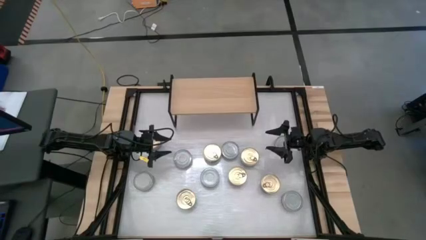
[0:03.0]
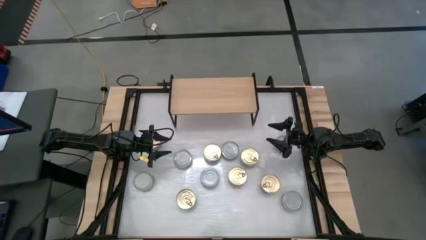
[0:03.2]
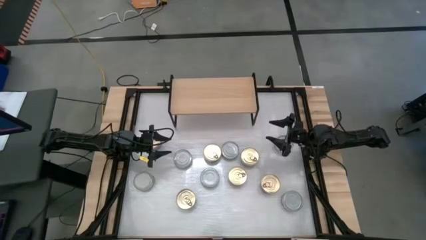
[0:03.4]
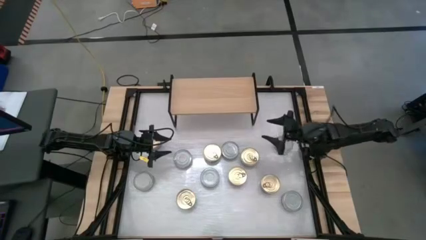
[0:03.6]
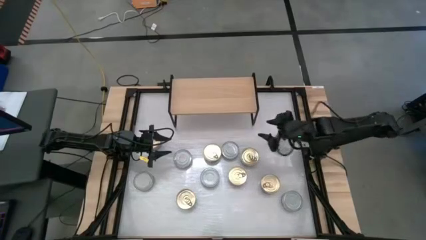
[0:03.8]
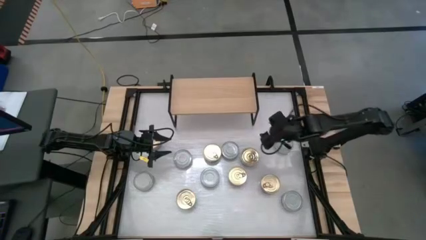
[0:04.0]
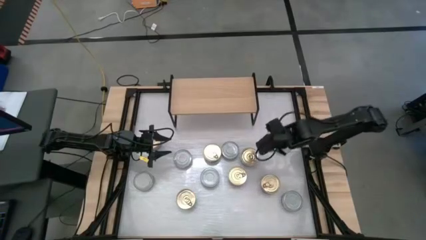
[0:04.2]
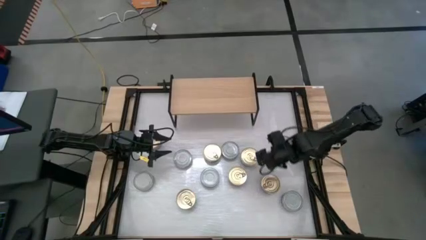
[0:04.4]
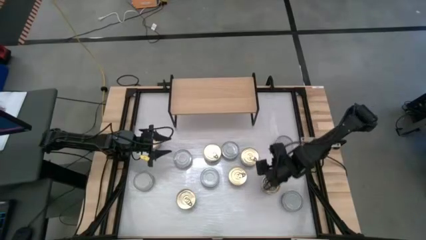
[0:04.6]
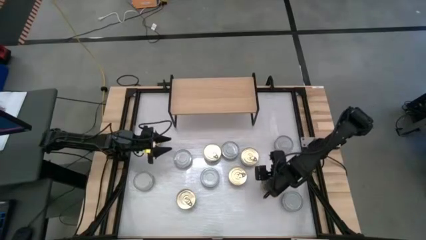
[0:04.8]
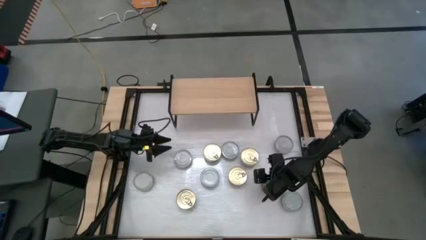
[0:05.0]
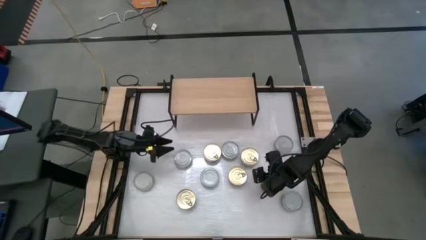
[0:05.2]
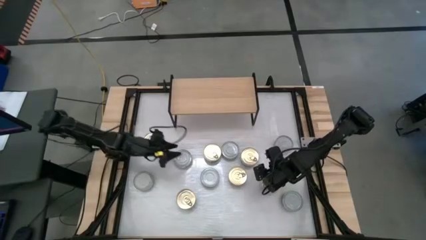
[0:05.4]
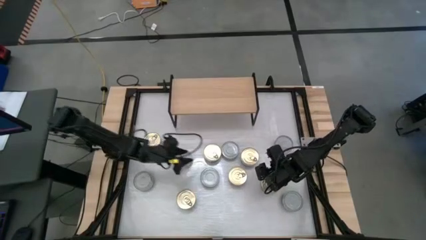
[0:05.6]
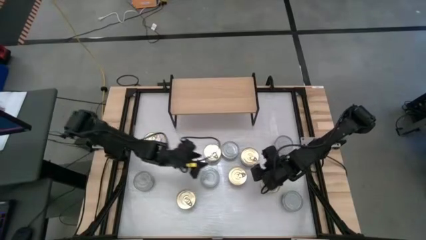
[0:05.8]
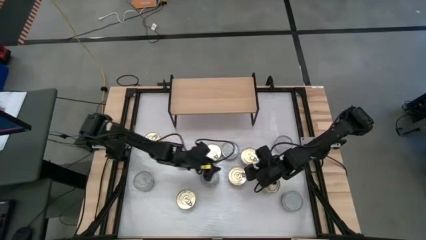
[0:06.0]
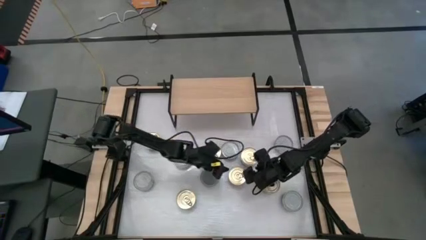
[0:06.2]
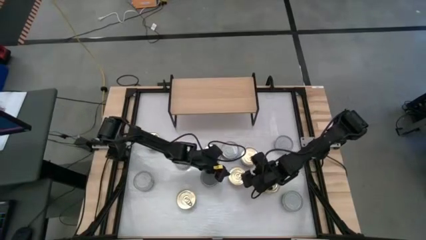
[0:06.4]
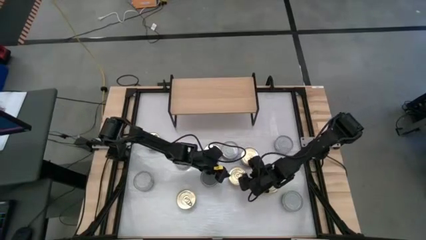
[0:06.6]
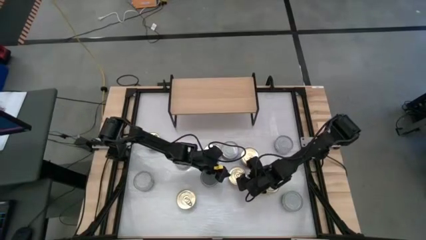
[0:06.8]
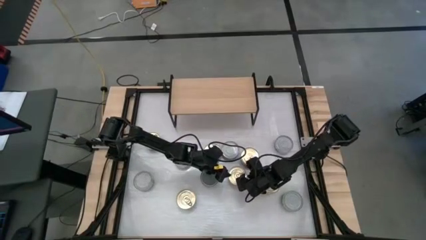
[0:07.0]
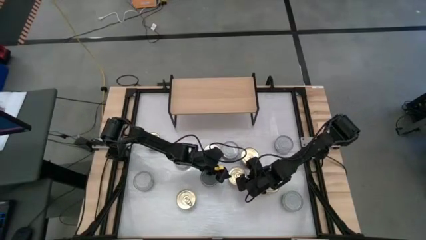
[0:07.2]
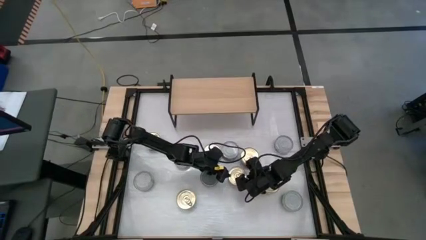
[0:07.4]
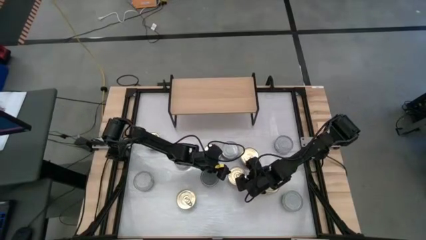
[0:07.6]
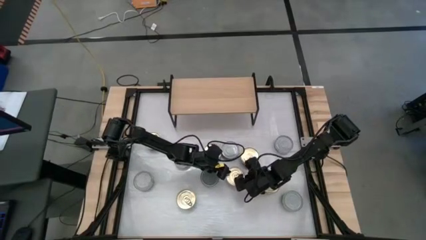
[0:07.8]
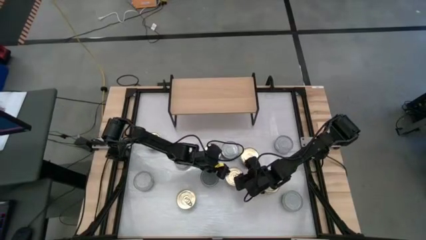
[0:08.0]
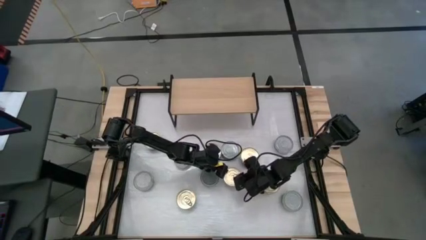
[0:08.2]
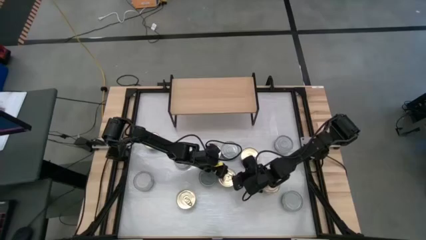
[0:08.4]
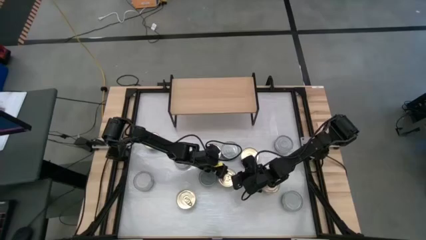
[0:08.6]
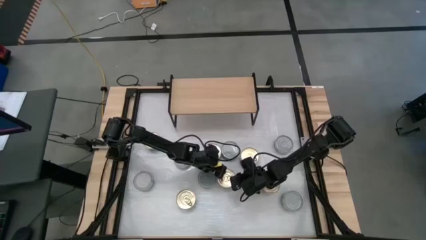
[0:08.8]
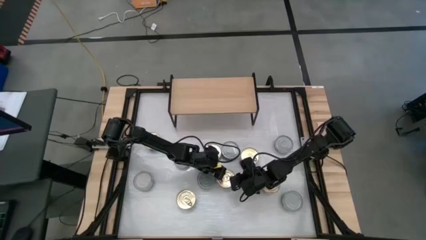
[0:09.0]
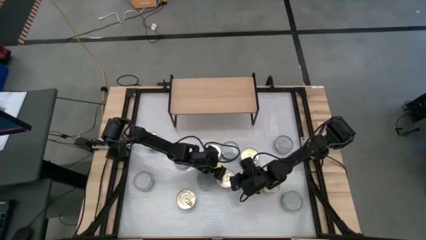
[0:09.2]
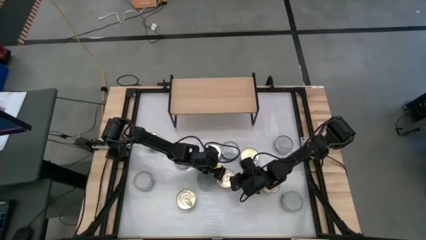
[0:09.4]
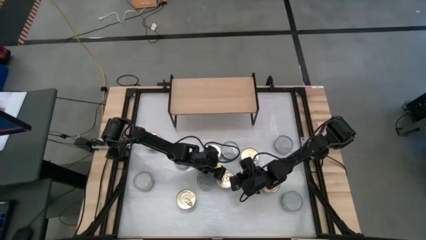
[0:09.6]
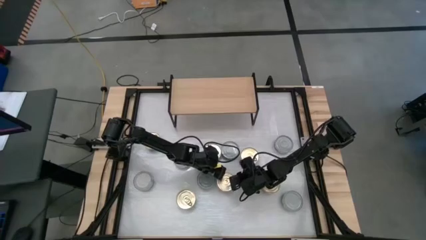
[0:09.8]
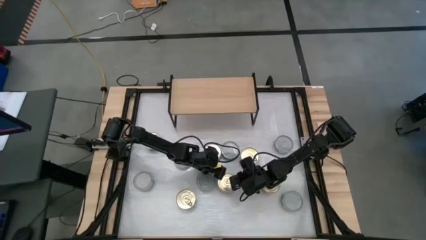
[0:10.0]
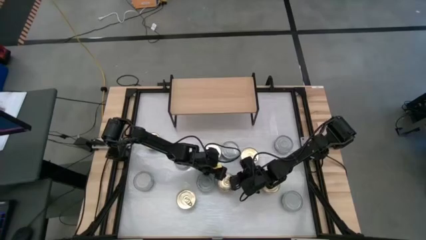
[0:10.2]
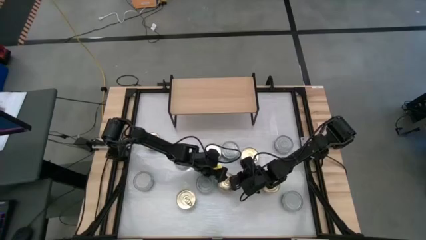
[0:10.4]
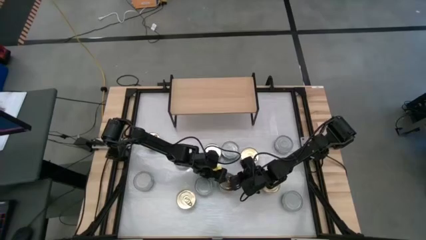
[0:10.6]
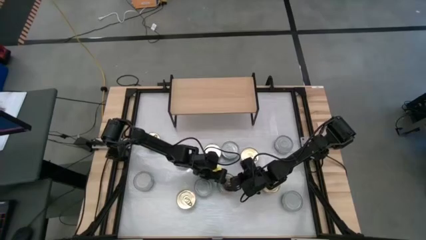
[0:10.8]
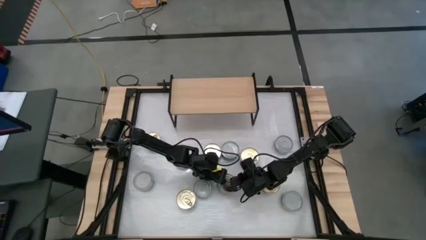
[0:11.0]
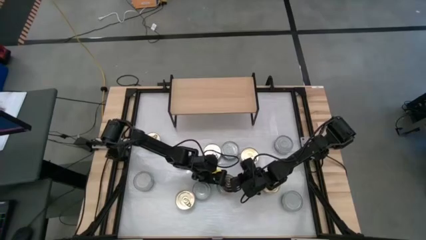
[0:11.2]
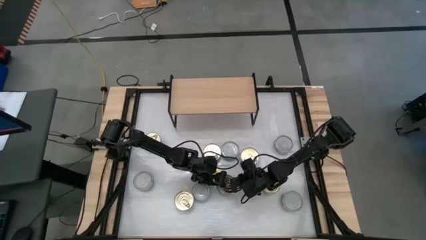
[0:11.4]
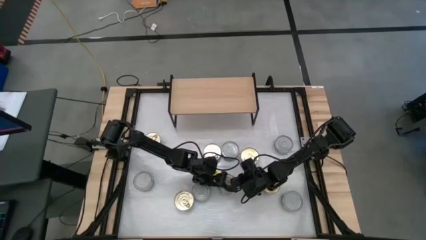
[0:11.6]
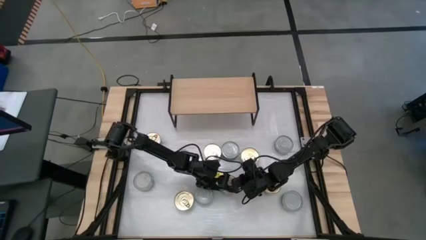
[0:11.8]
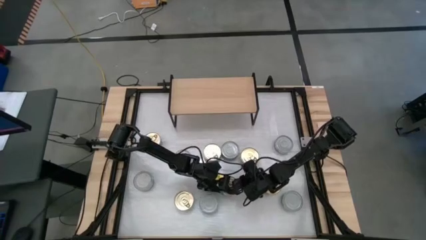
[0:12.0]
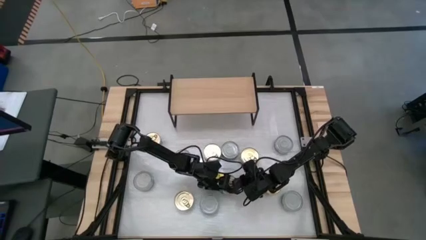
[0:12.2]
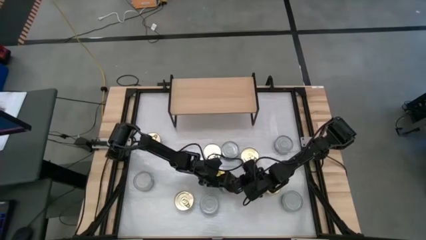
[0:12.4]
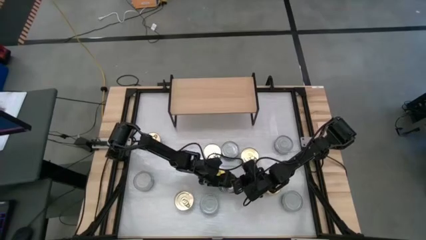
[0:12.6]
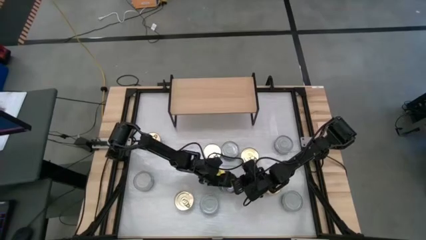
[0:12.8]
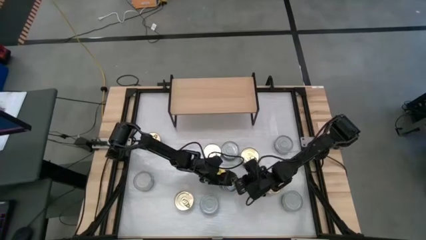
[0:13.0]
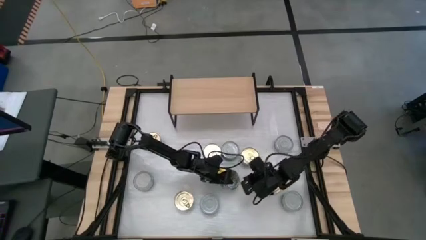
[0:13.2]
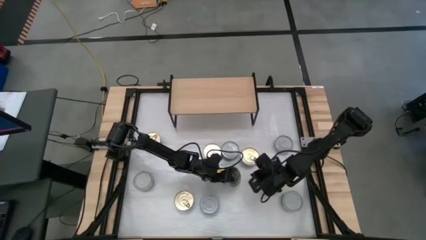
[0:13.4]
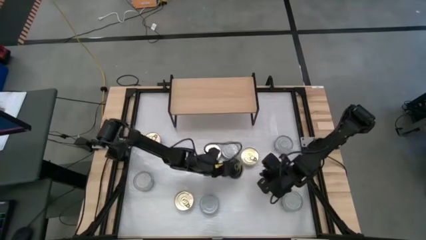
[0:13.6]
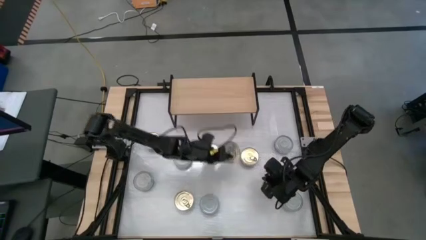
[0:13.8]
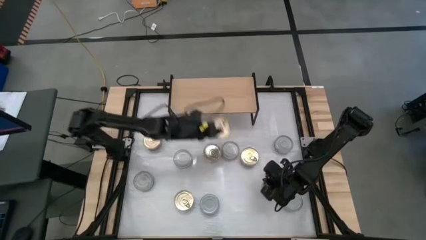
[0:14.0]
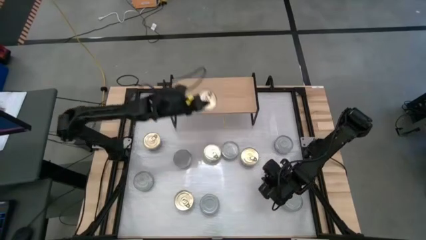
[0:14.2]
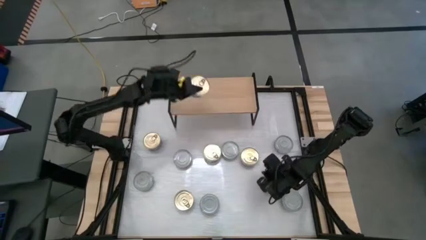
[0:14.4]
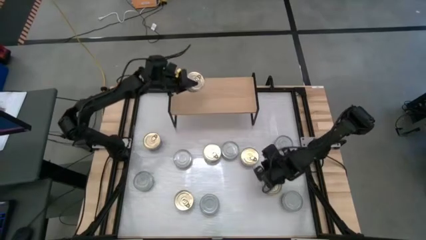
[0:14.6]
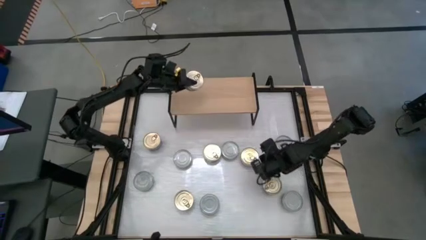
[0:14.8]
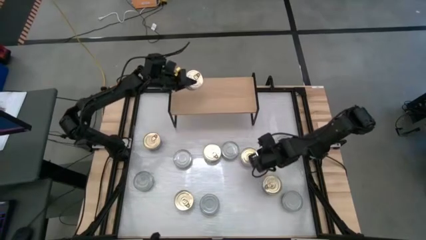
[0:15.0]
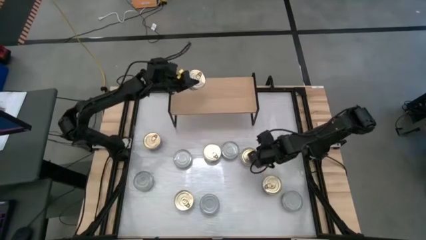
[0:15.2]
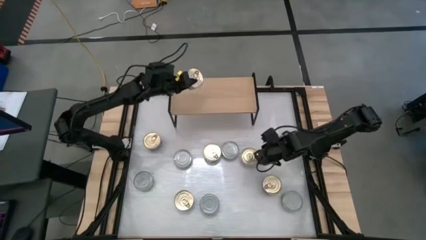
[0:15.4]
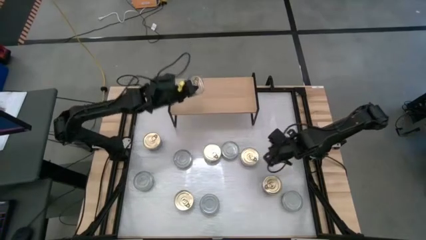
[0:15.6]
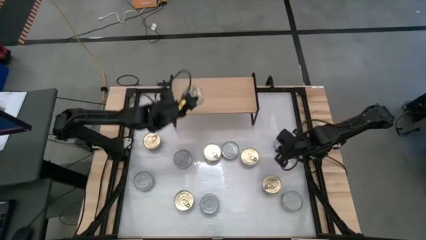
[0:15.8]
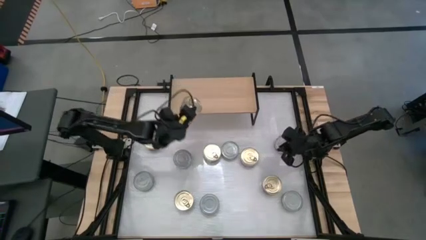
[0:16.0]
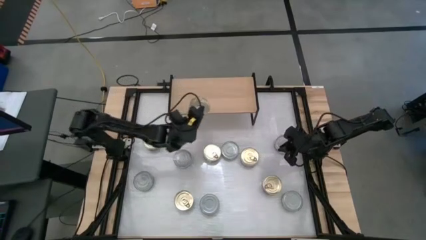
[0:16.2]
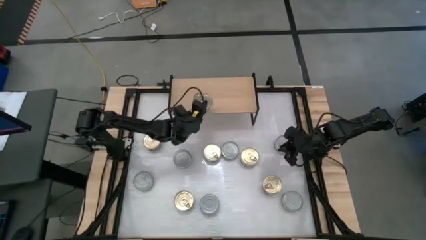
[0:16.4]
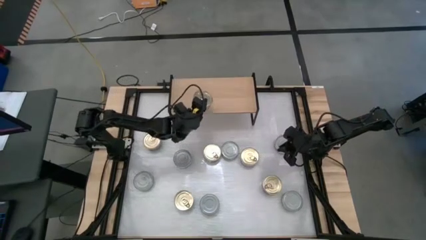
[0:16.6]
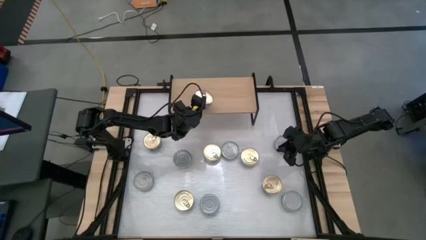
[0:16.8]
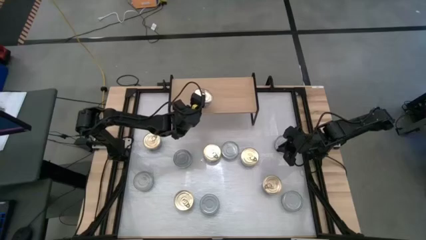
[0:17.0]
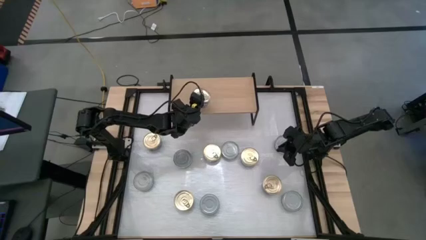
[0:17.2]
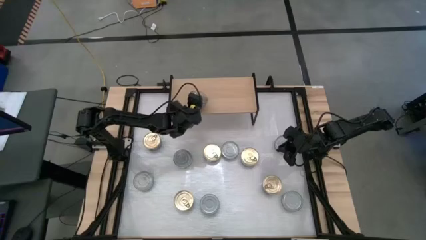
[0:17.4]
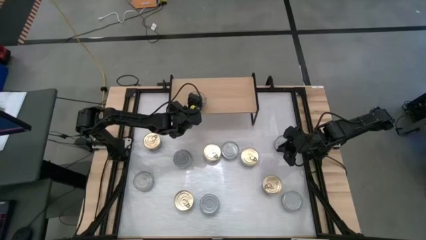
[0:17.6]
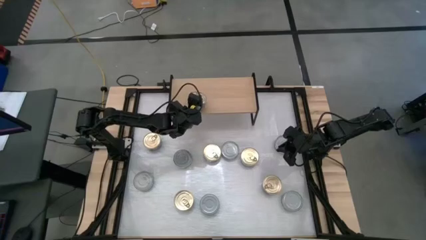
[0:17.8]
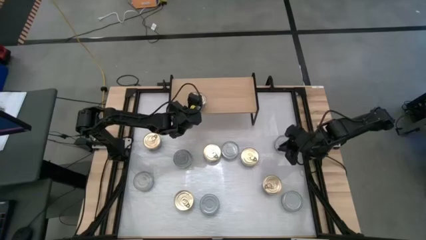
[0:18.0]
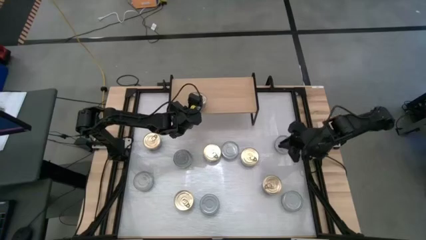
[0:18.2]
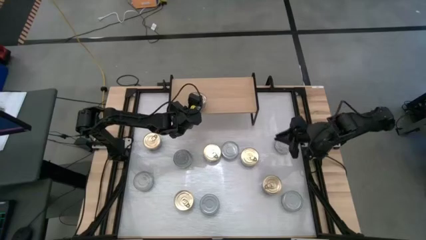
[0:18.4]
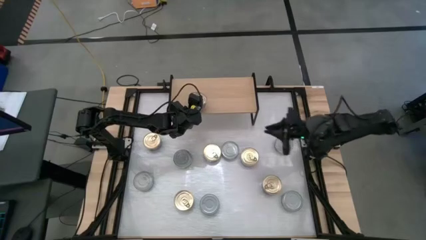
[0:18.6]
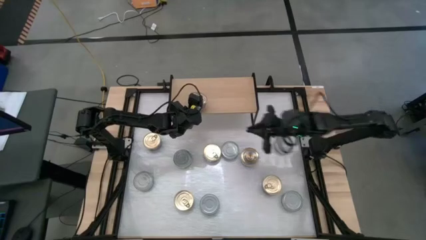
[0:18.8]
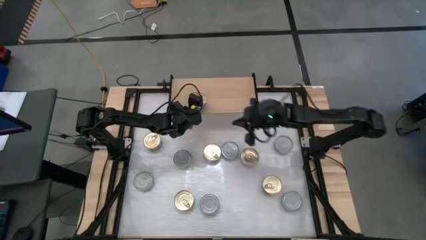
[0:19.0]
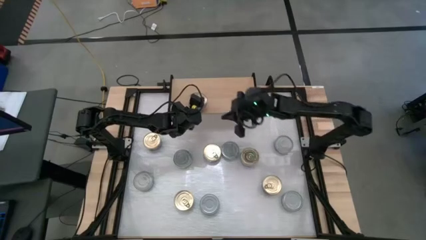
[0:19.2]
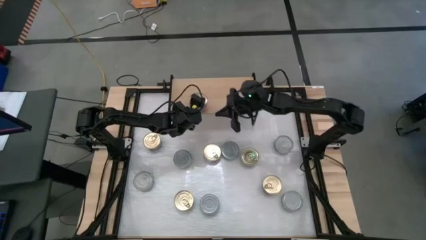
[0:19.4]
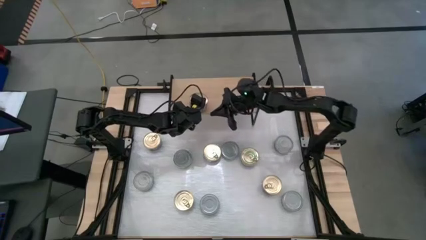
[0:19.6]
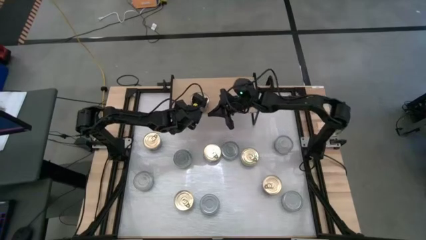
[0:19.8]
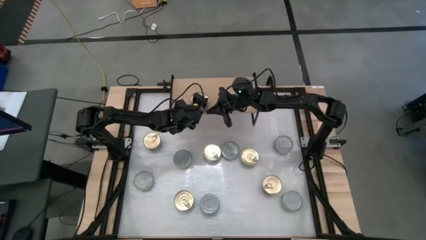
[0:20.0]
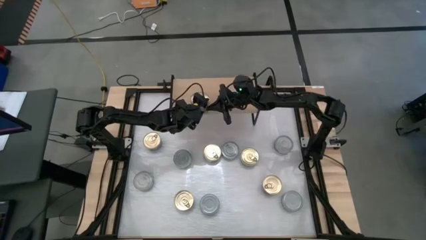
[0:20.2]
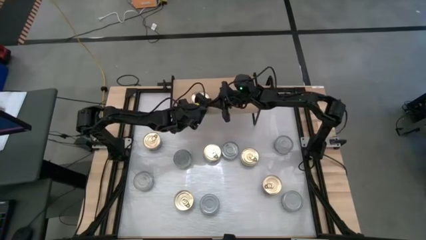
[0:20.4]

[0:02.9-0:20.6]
Task: Stack canned seafood by type on shelf
Put the blue and pink tuna can on the shelf
